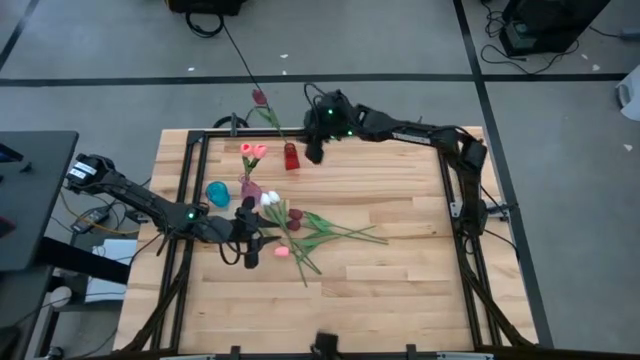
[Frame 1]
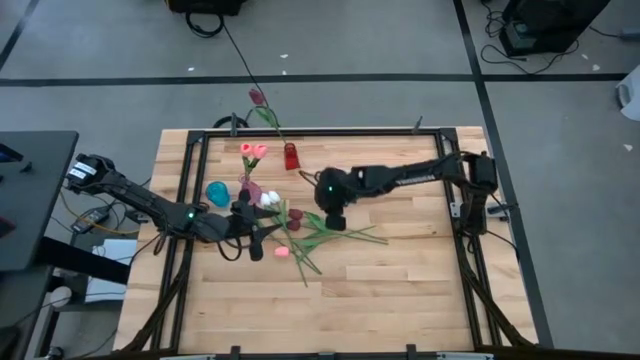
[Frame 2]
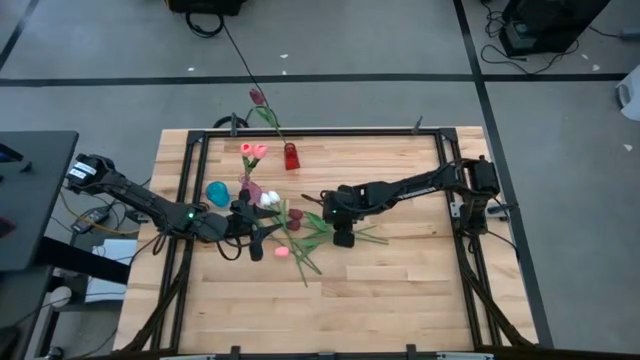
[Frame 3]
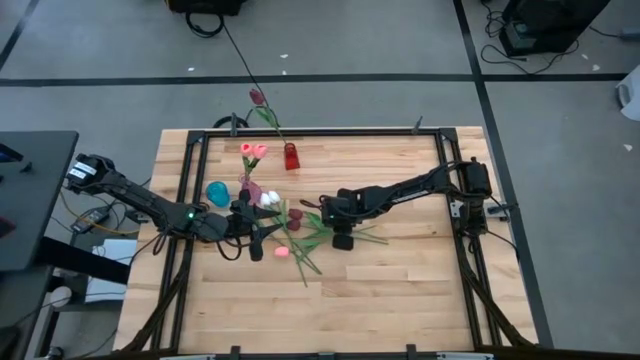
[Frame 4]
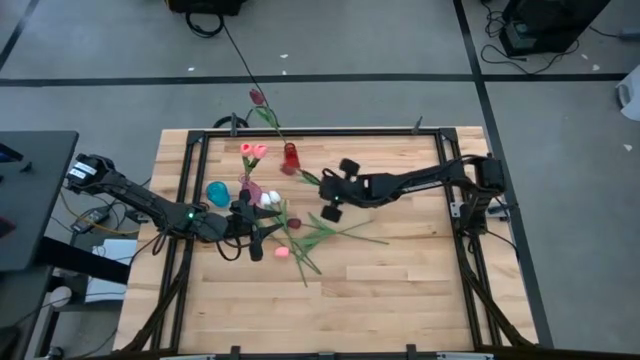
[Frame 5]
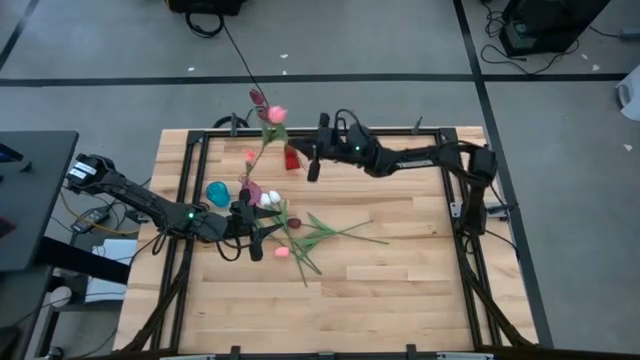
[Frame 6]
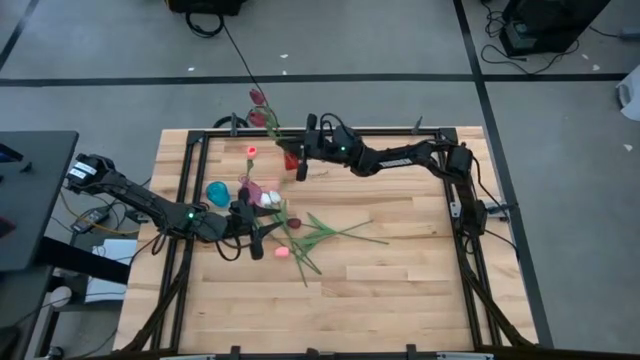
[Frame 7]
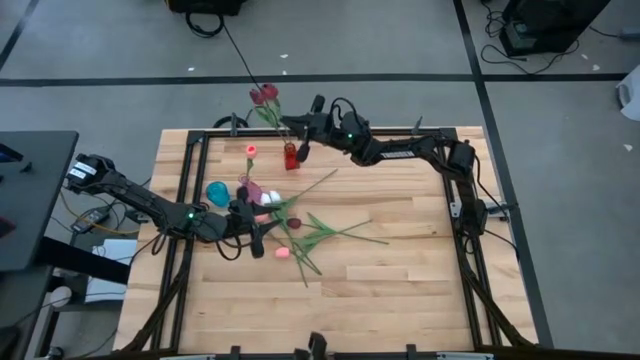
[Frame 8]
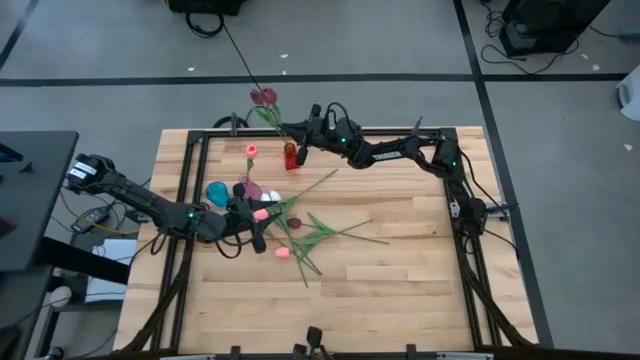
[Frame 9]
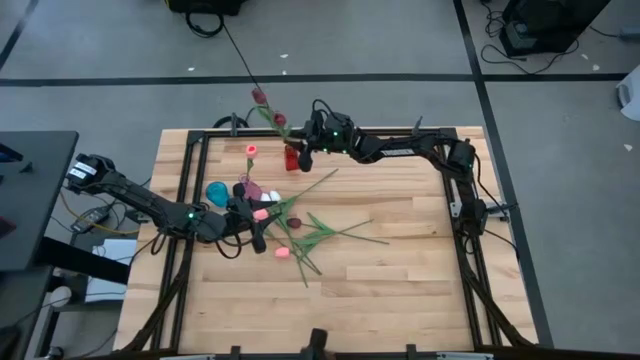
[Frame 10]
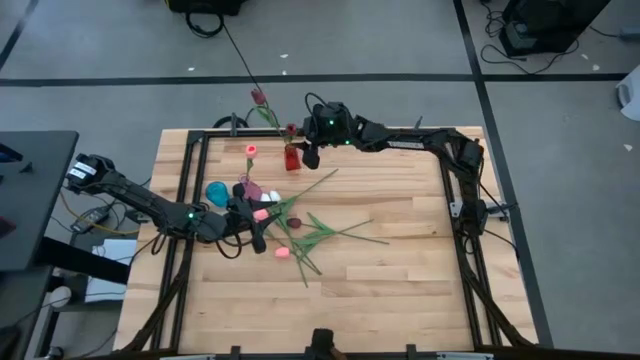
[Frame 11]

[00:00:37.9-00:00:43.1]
Task: Sort flowers into vase by color
Put the dark red flower into the red vase

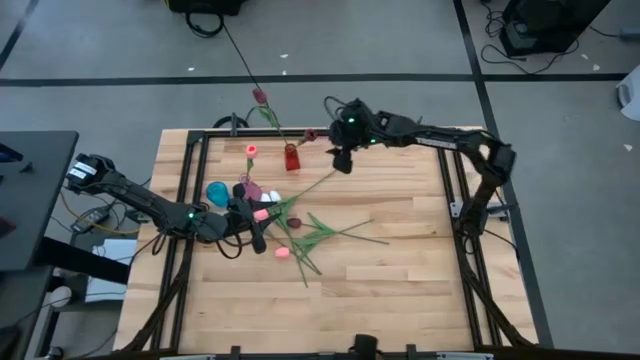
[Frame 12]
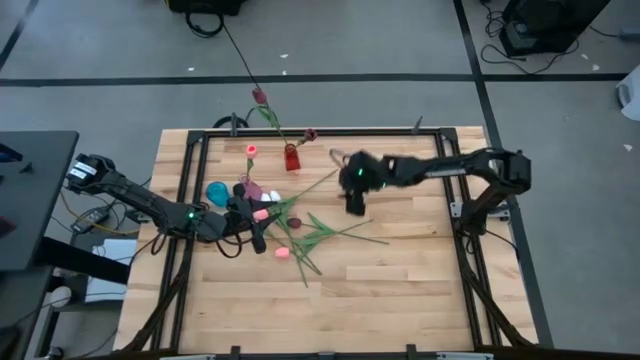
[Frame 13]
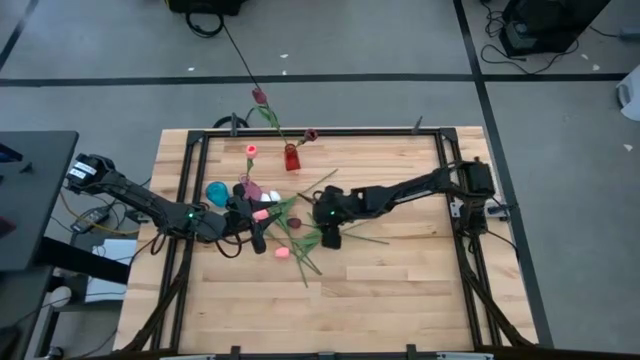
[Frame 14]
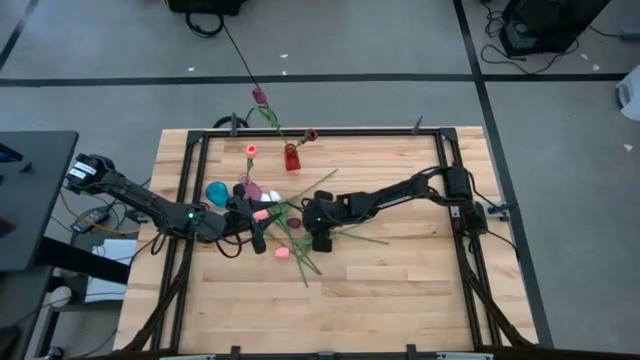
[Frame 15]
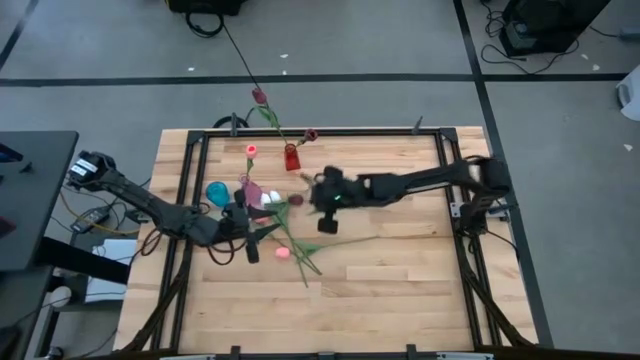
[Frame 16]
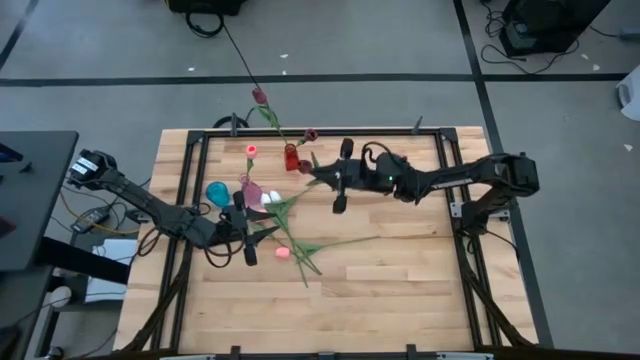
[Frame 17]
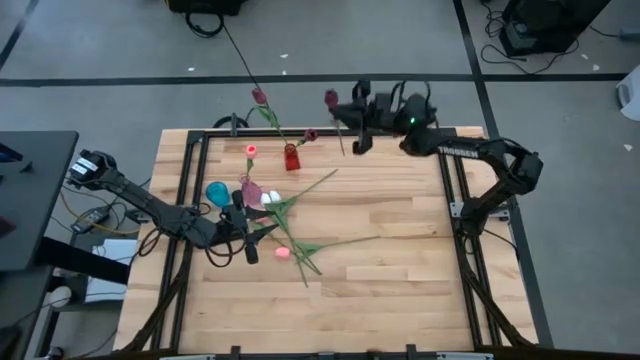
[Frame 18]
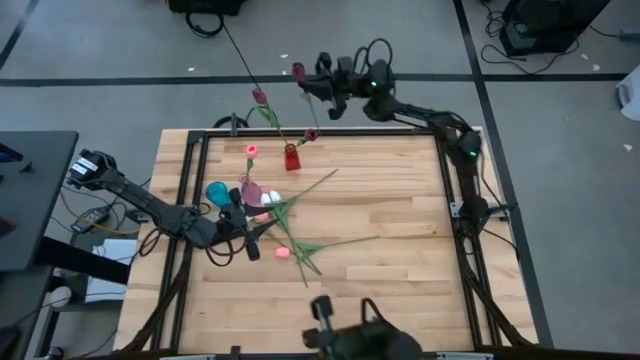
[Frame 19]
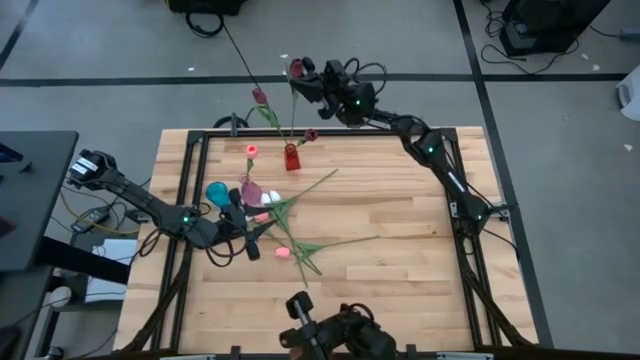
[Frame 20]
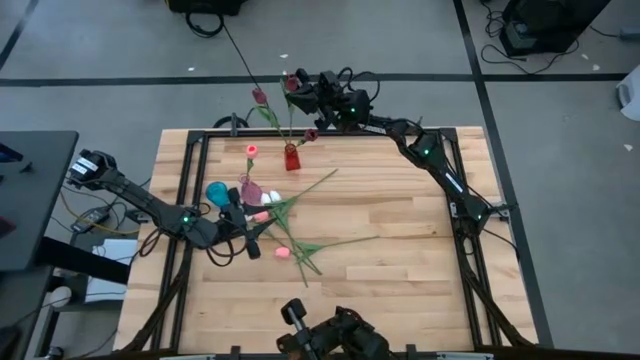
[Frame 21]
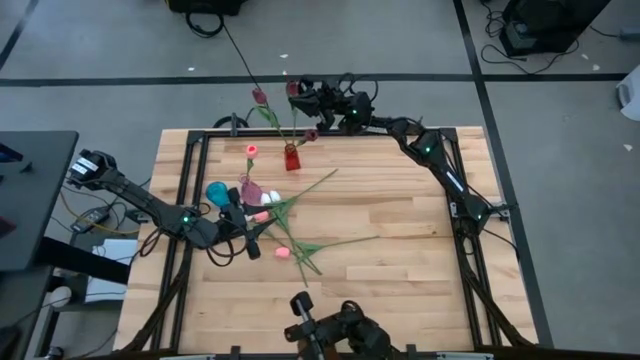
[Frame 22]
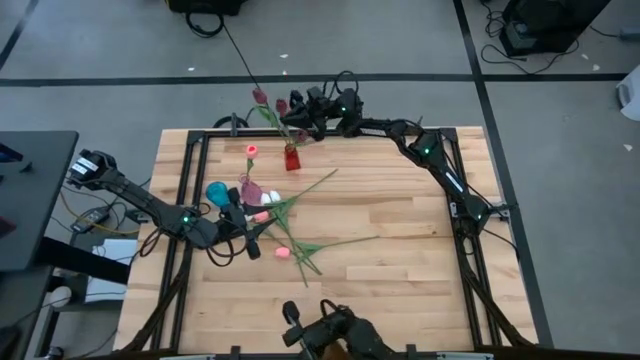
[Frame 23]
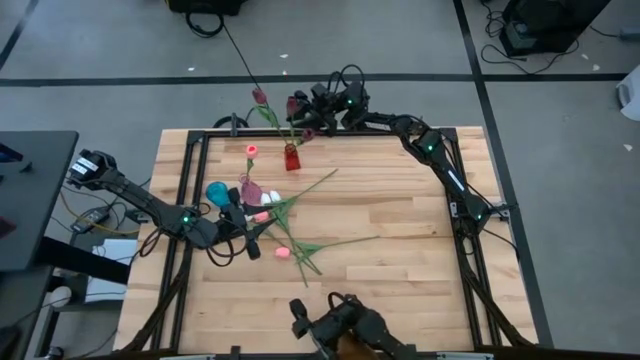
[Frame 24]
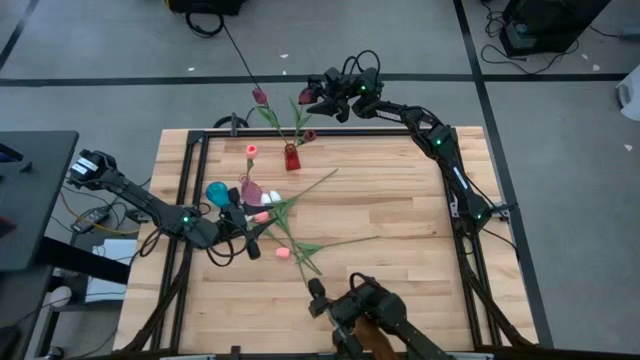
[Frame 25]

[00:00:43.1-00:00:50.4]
Put the dark red flower into the red vase

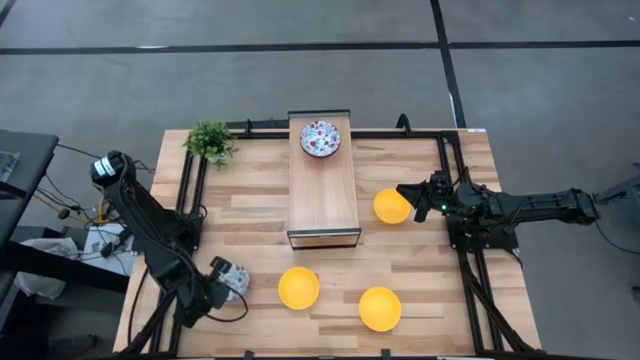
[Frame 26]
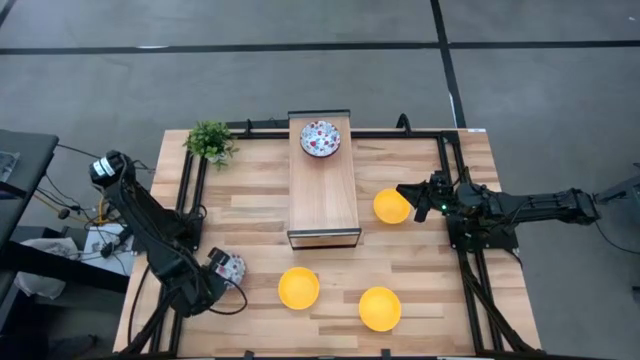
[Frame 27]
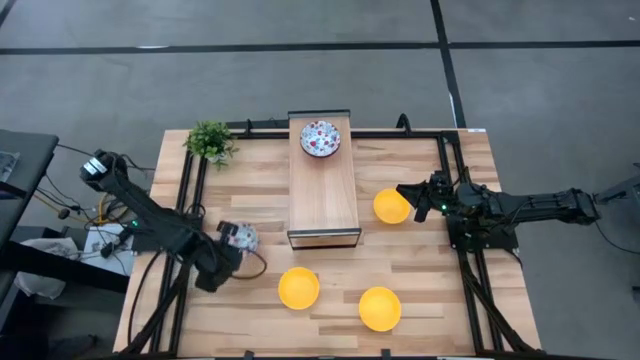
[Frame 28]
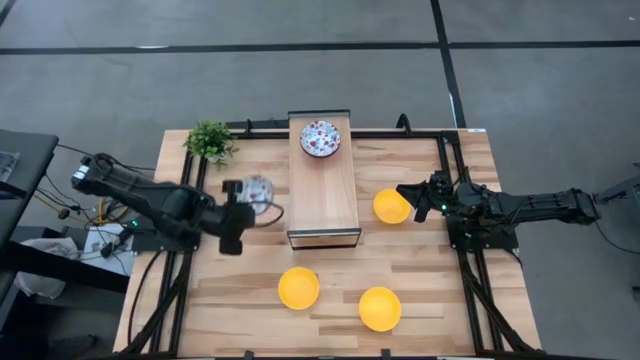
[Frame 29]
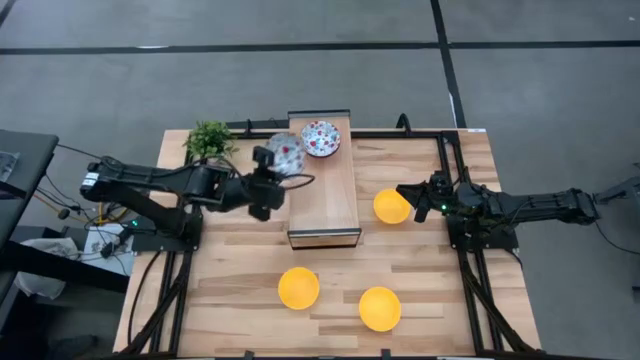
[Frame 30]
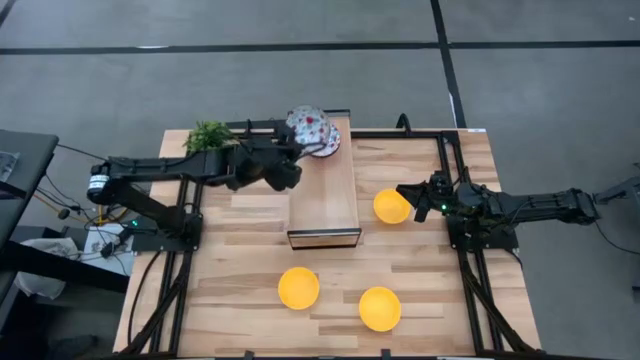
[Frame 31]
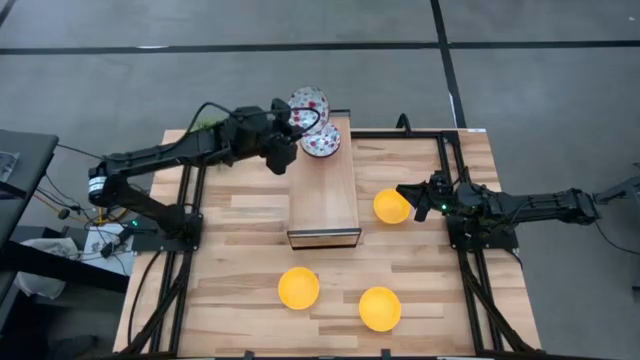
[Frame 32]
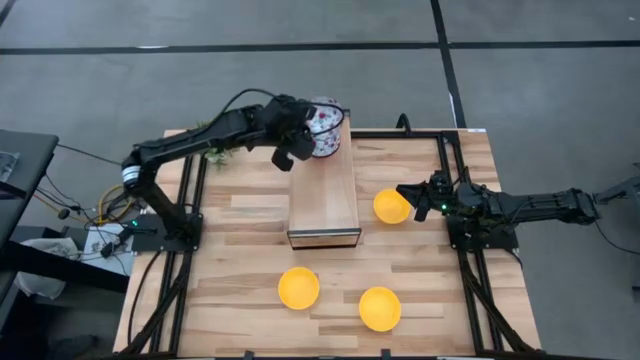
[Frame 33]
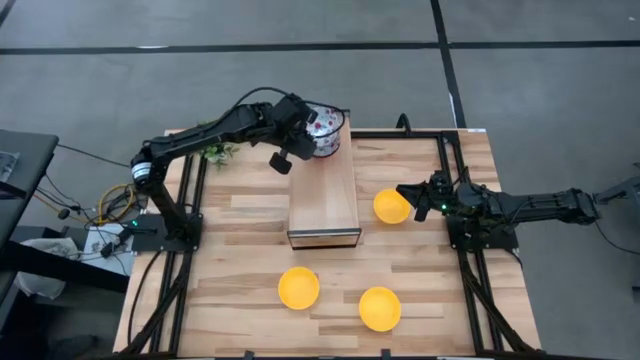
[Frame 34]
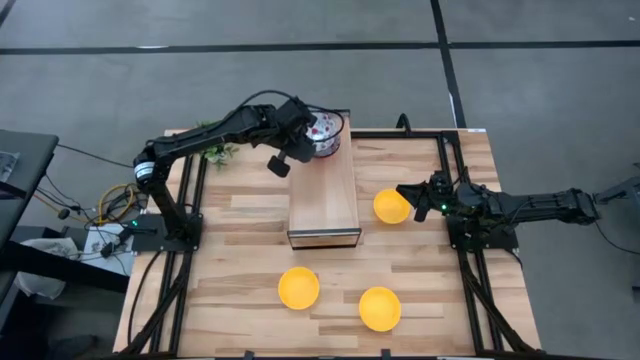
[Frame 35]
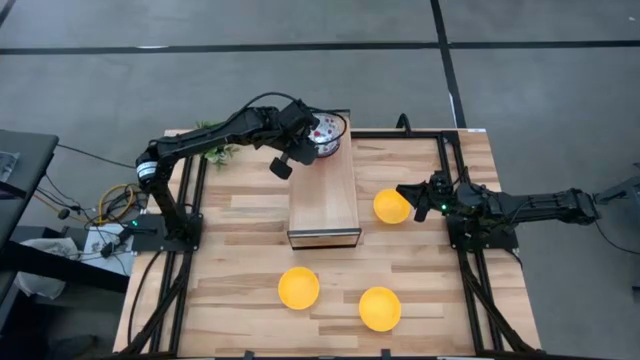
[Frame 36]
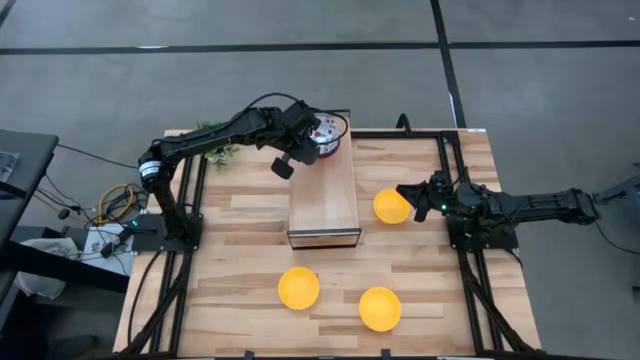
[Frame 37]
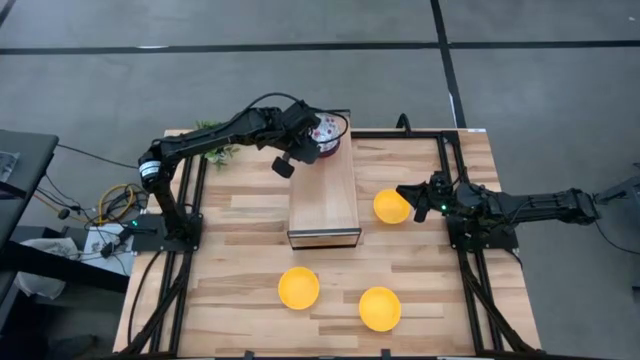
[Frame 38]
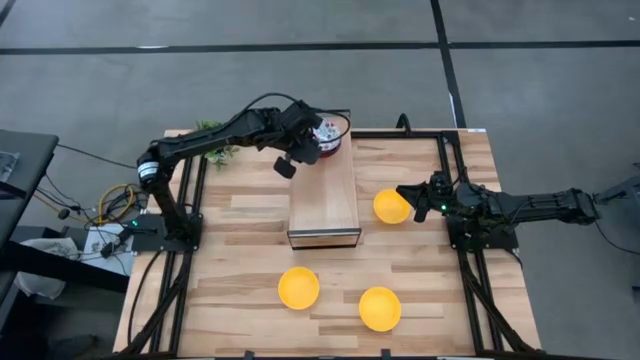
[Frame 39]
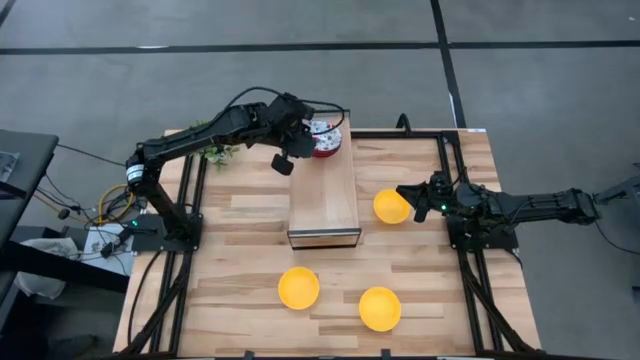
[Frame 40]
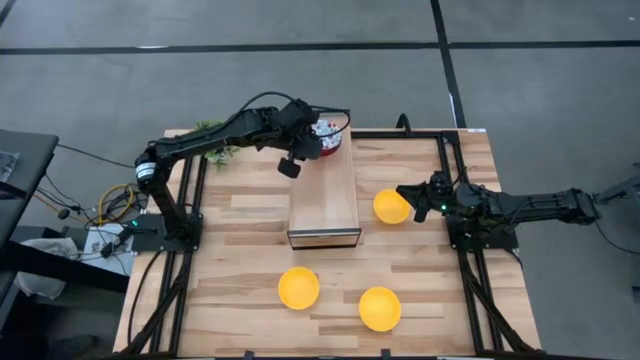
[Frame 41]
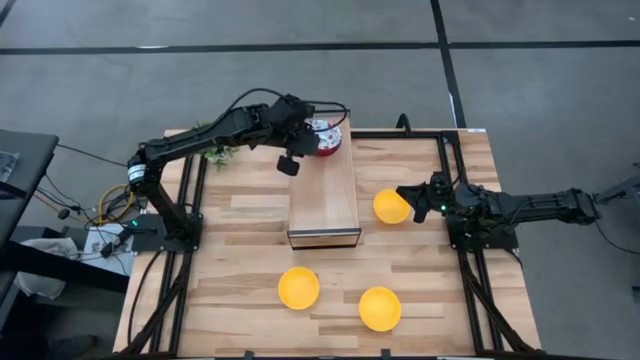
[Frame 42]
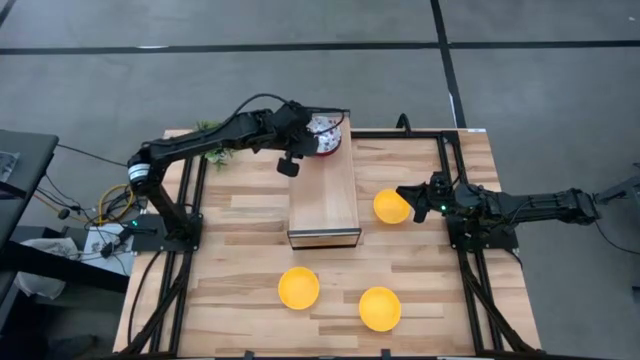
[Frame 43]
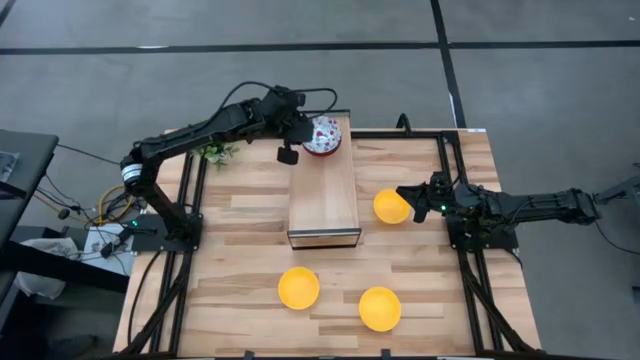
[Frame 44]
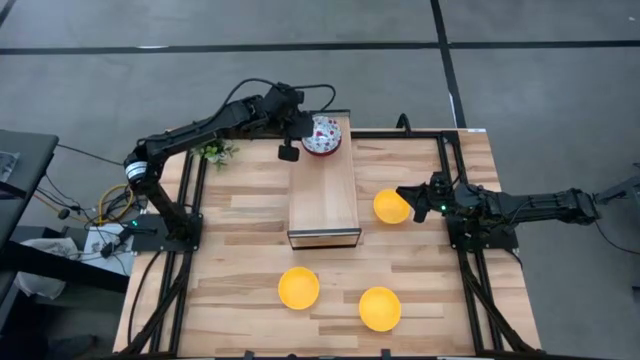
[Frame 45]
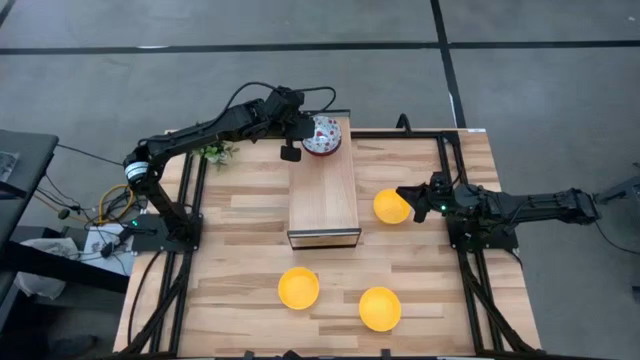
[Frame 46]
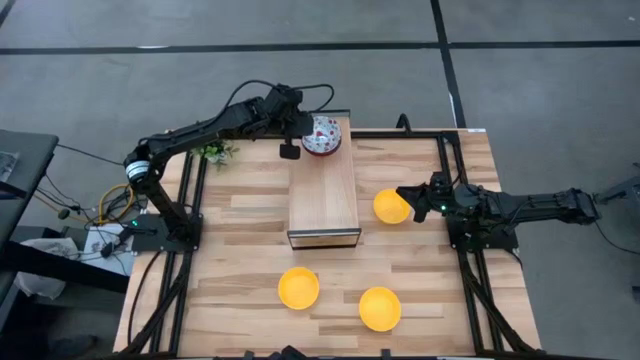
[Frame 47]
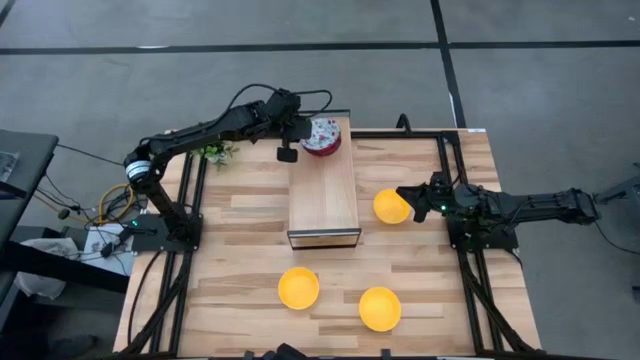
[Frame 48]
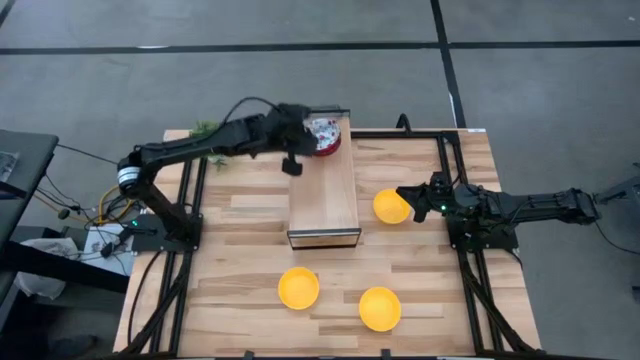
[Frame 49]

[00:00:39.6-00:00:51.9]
Task: Pick & Place Mini bowls
Stack the white patterned bowl on the other white patterned bowls on the shelf
